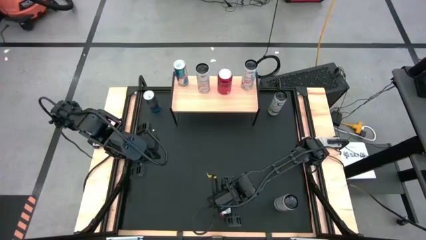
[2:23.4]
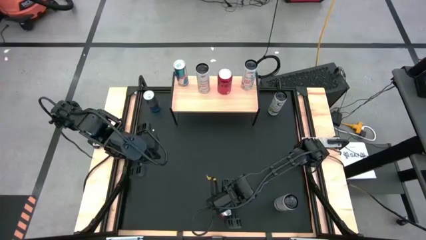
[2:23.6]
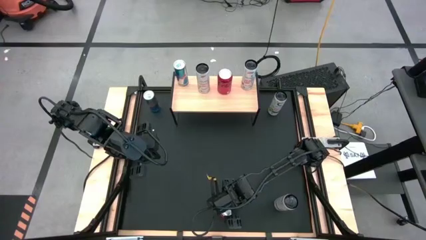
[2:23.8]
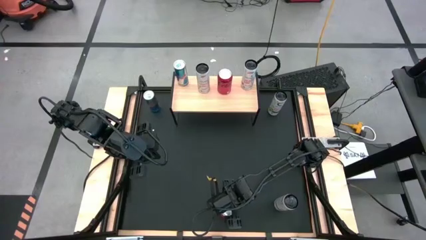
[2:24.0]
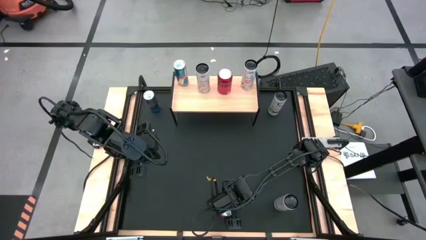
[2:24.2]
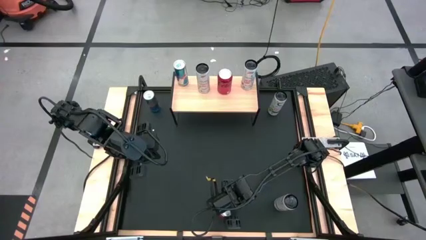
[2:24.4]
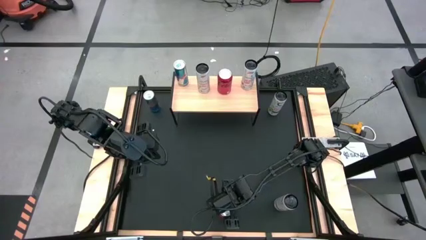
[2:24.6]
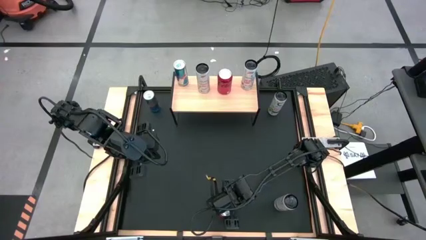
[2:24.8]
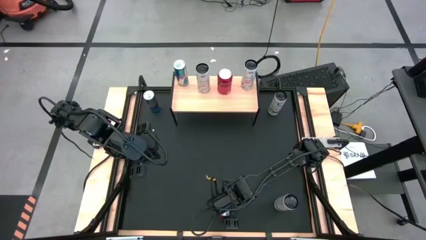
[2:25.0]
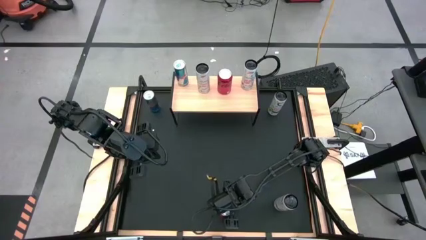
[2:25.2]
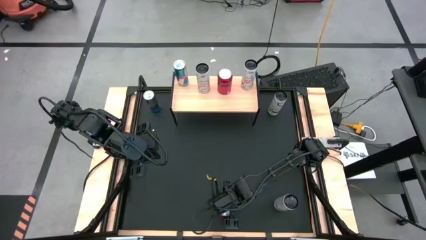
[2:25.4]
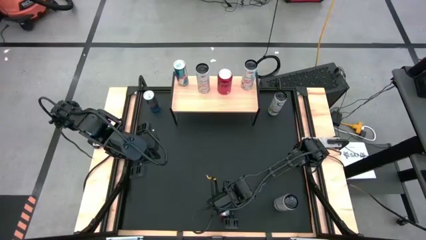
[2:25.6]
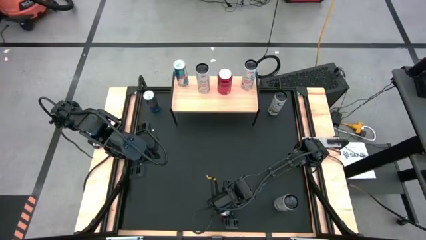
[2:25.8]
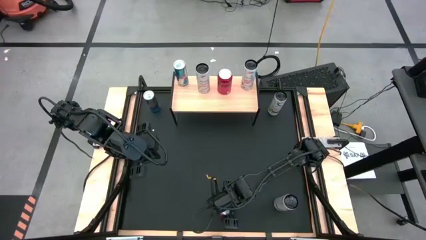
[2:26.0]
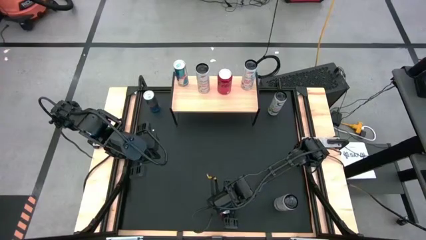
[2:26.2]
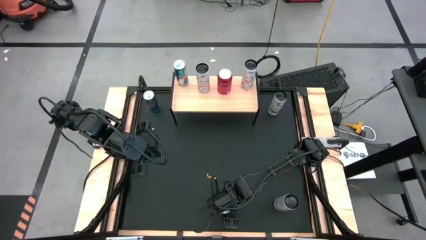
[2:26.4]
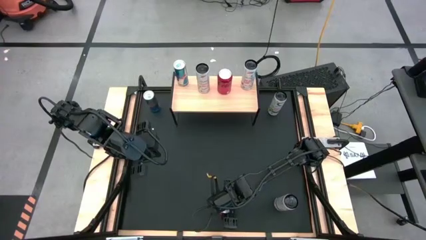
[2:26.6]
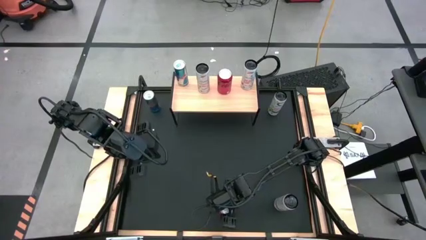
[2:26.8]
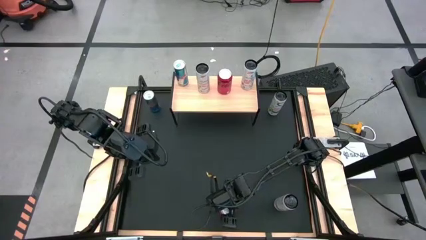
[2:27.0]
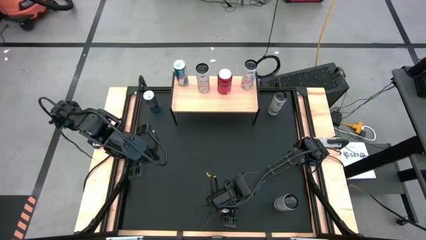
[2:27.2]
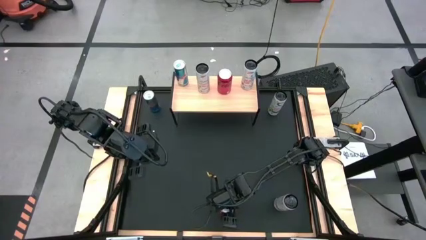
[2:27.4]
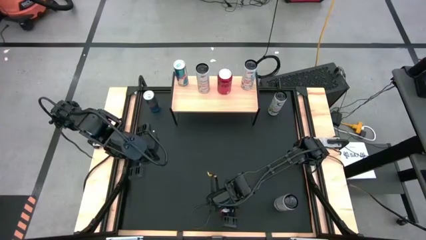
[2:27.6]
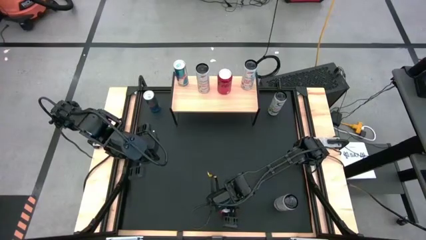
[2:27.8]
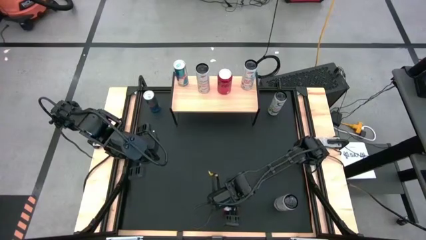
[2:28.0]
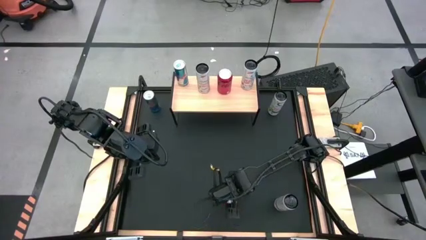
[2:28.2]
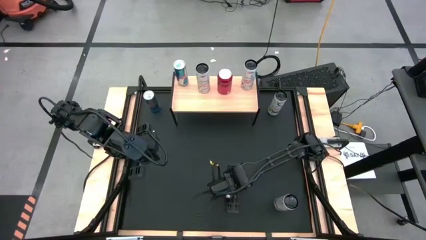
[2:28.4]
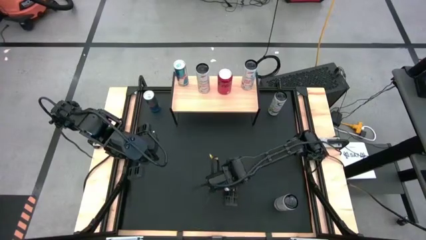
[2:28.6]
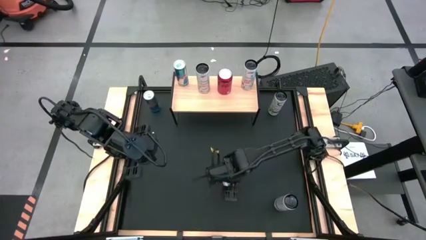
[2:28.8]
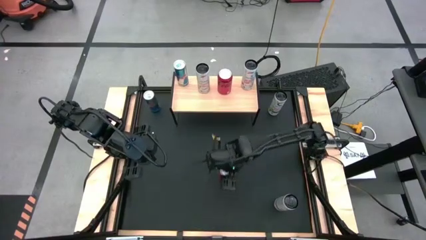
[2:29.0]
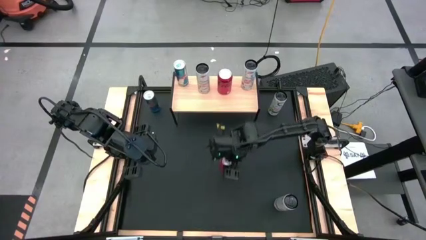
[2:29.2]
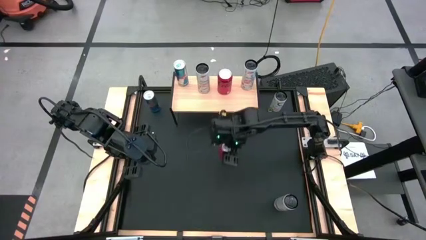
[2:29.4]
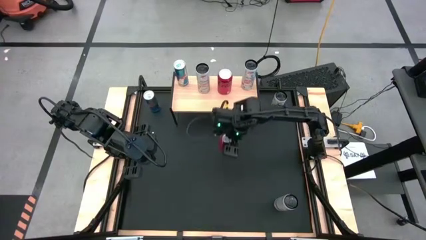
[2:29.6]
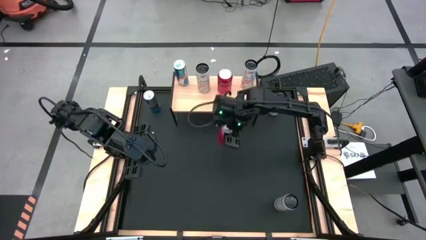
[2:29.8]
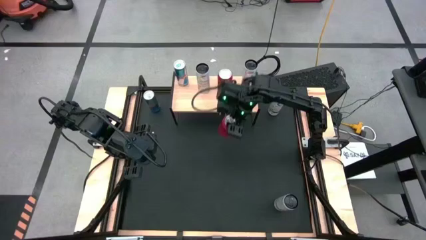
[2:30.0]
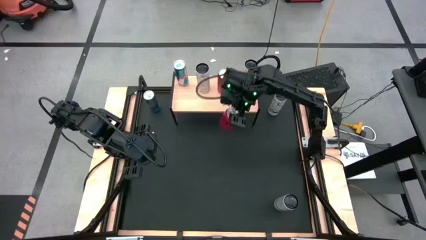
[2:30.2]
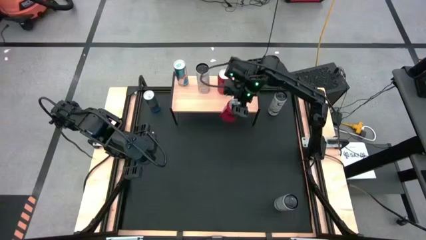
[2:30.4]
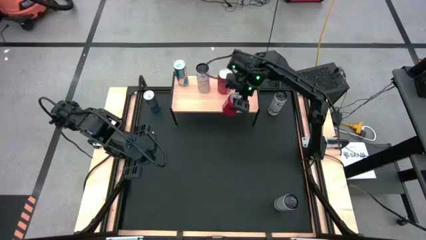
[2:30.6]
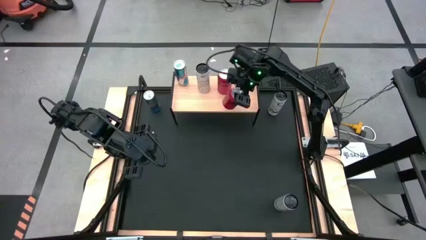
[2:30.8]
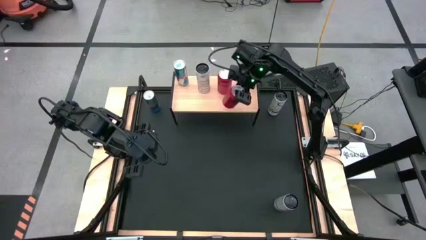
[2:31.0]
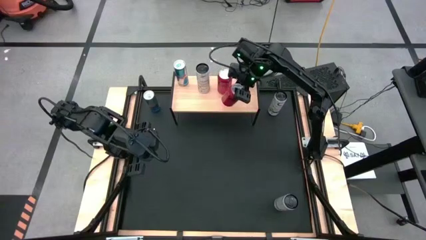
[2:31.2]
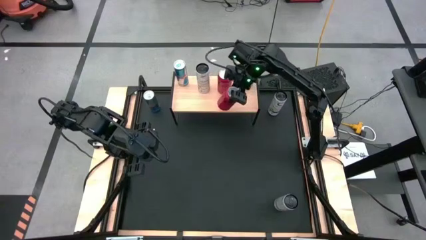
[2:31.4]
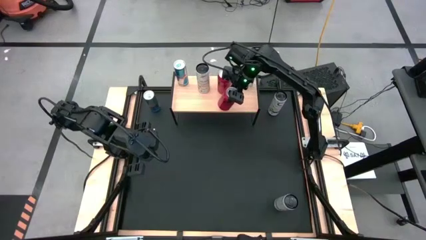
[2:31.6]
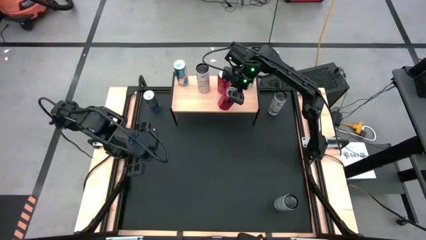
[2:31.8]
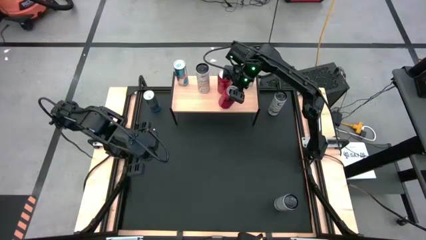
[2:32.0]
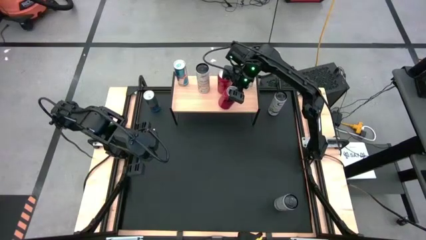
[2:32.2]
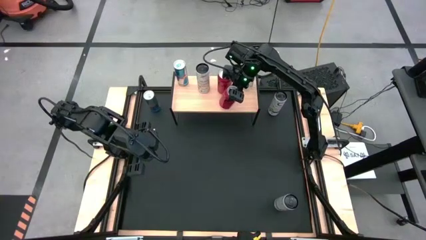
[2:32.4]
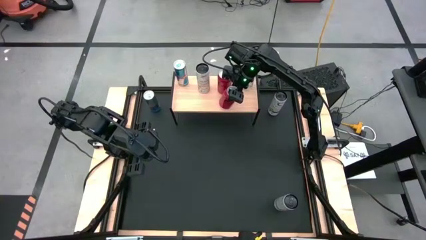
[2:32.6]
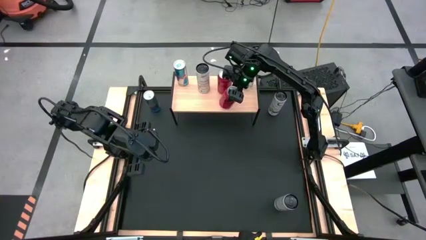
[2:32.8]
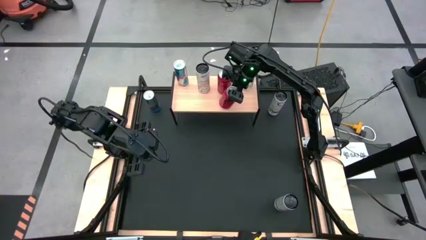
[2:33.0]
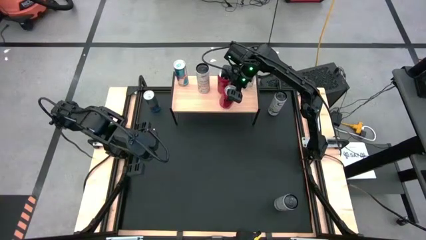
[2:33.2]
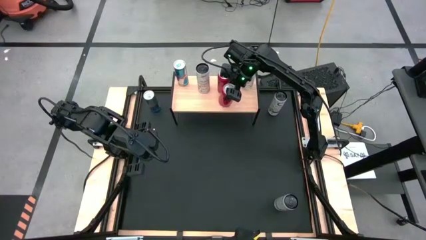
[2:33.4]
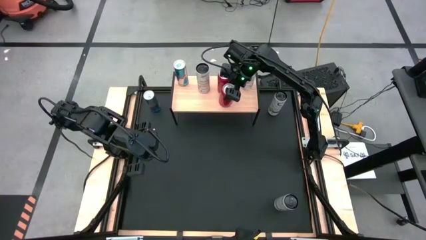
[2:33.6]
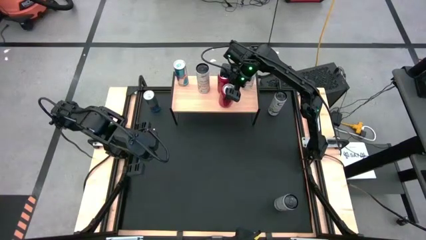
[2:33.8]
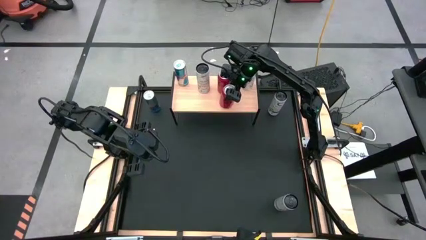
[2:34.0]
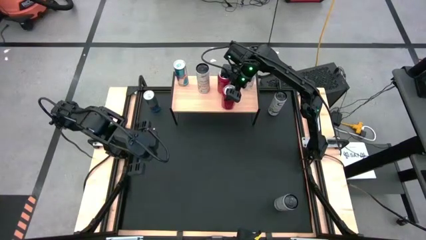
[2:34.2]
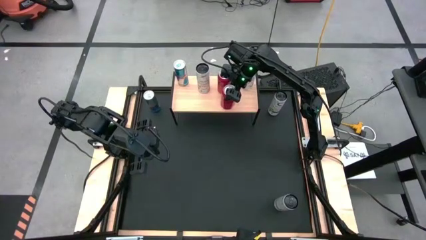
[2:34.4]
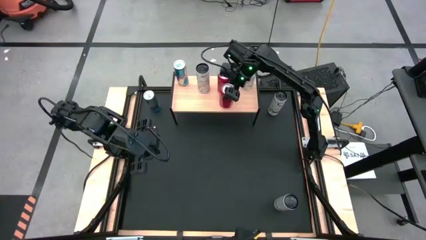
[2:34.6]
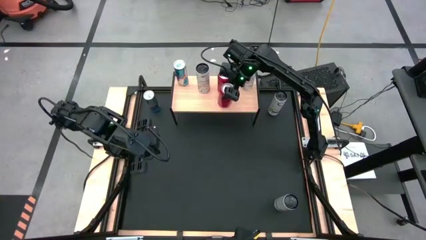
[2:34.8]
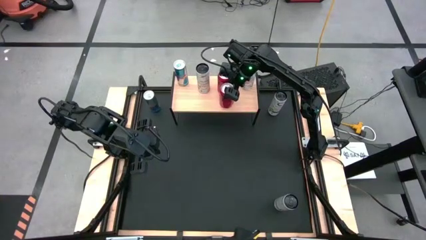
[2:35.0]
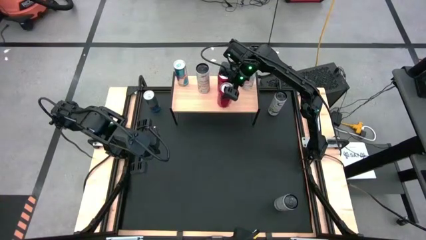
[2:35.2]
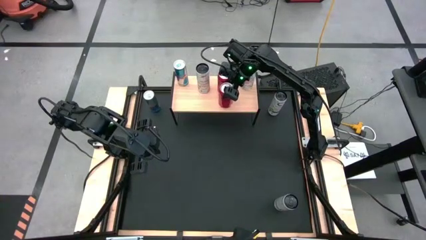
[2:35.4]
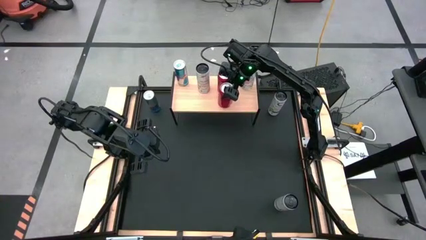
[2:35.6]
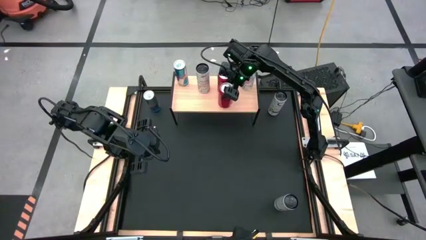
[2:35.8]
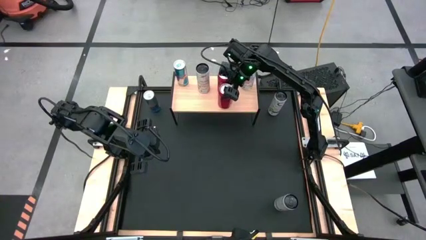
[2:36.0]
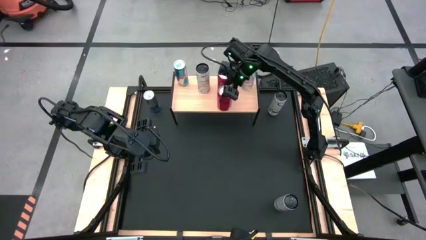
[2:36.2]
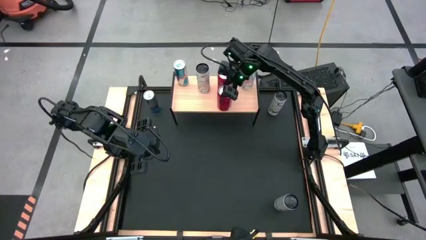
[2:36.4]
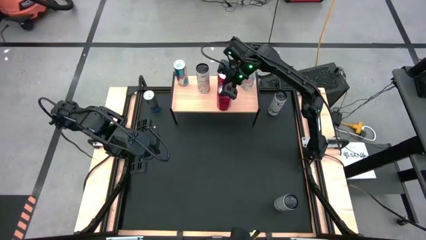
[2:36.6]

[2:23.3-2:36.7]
Task: Place canned beverage on shelf
Put the red black soda can on the shelf aligned with the other red black soda can
